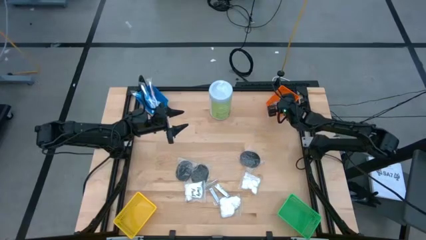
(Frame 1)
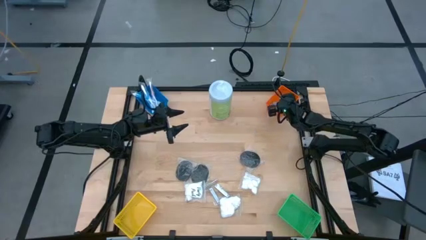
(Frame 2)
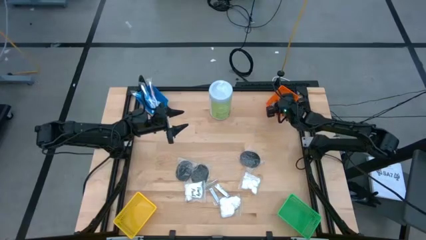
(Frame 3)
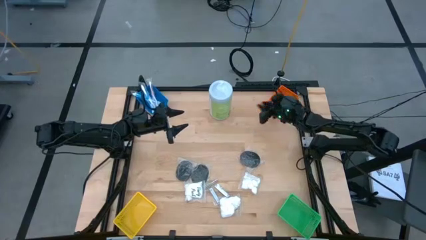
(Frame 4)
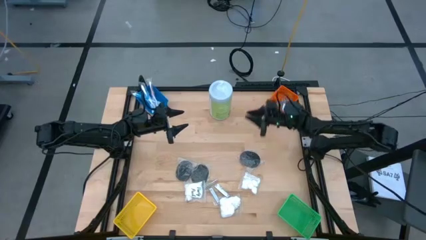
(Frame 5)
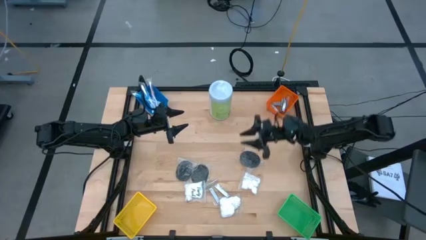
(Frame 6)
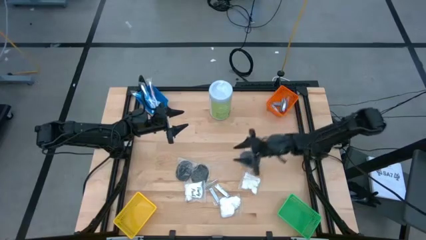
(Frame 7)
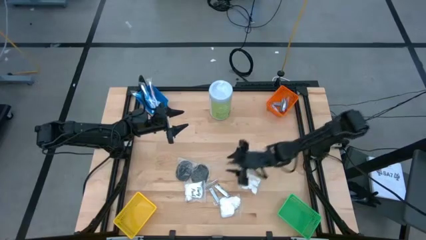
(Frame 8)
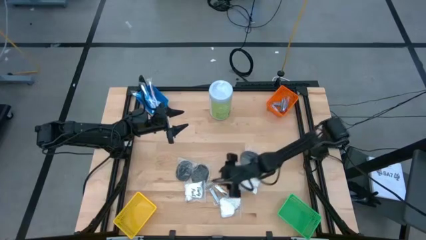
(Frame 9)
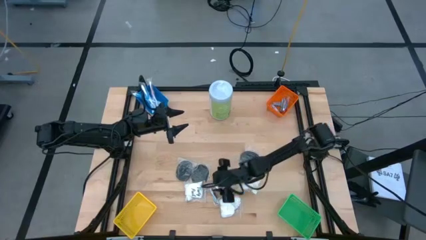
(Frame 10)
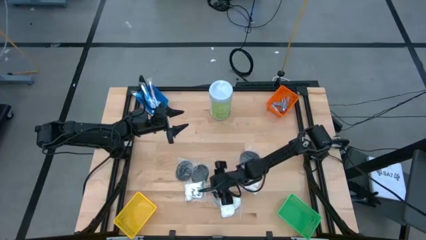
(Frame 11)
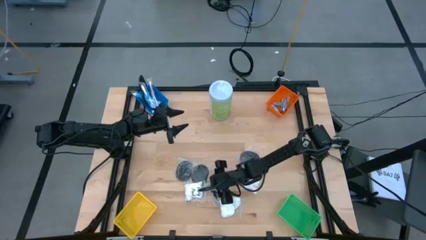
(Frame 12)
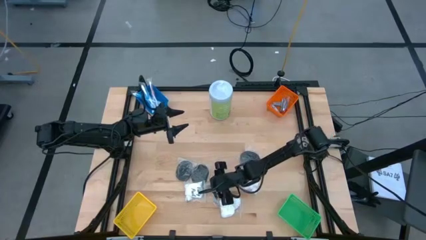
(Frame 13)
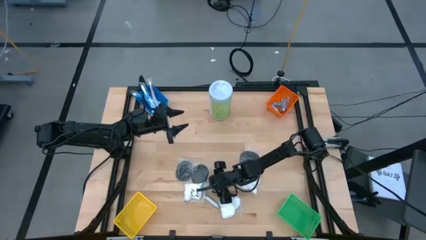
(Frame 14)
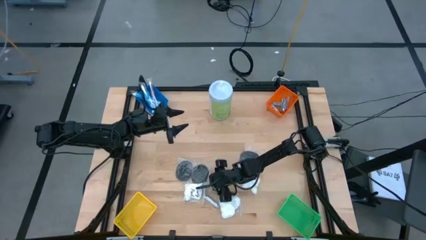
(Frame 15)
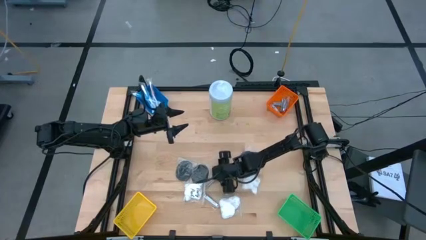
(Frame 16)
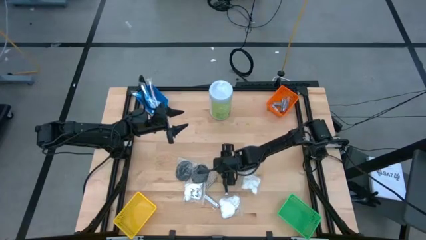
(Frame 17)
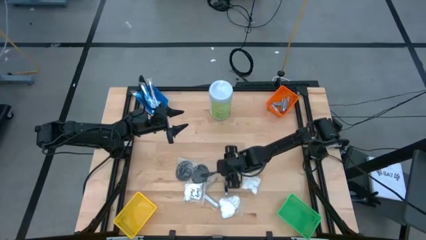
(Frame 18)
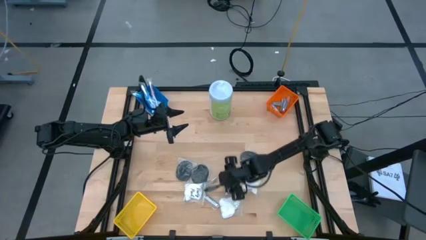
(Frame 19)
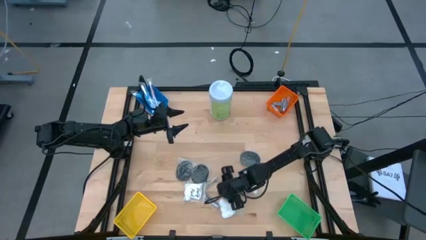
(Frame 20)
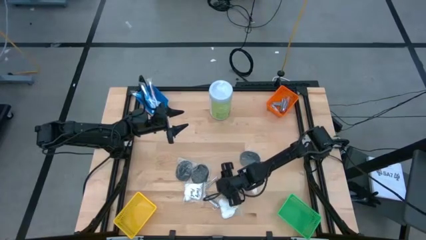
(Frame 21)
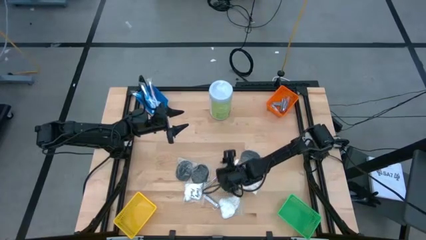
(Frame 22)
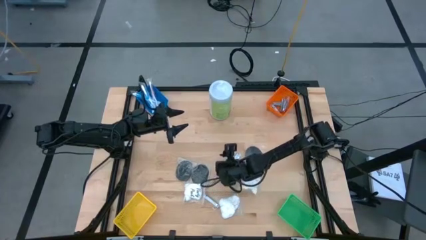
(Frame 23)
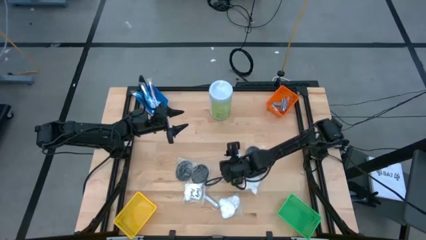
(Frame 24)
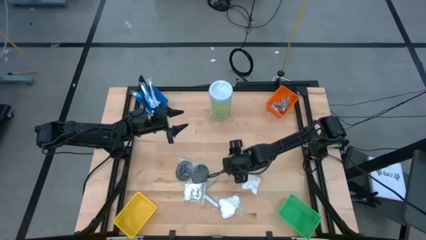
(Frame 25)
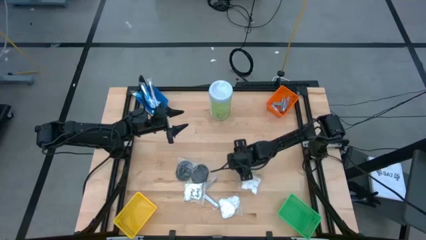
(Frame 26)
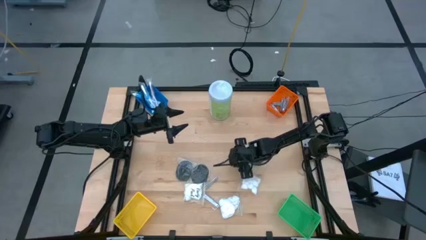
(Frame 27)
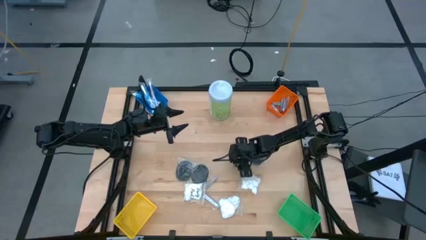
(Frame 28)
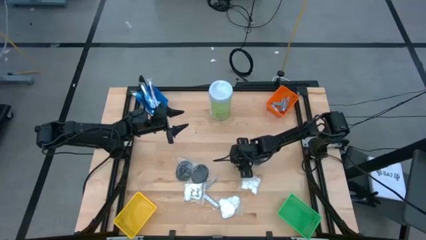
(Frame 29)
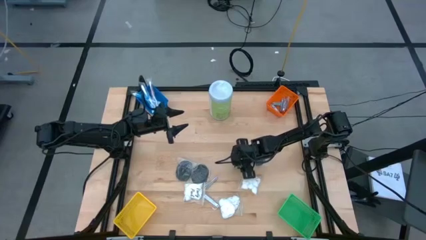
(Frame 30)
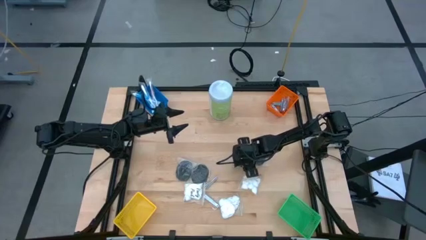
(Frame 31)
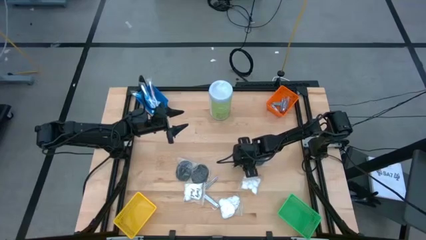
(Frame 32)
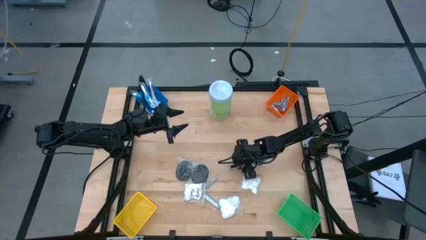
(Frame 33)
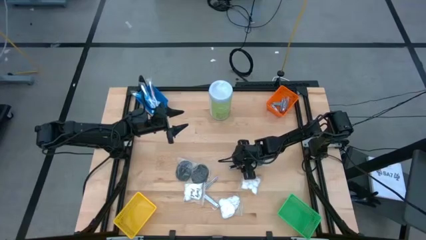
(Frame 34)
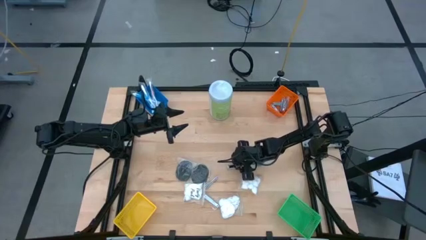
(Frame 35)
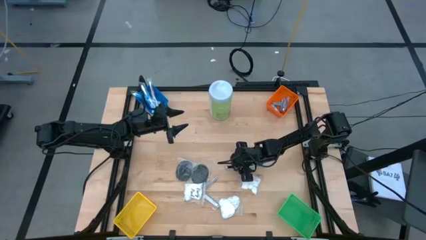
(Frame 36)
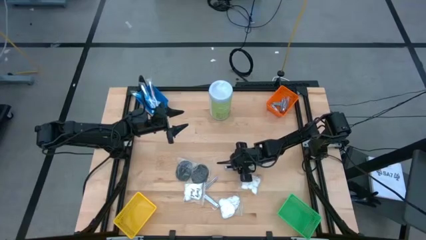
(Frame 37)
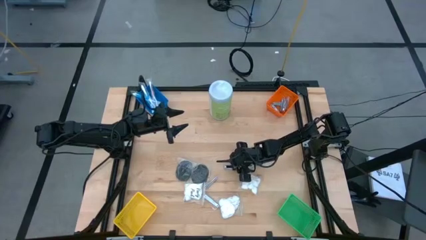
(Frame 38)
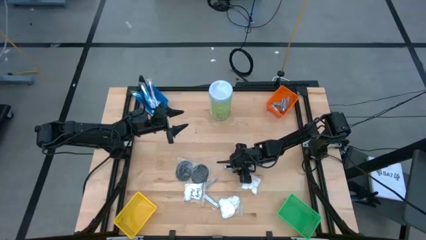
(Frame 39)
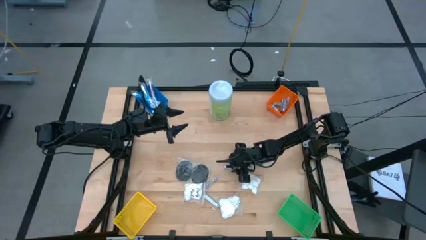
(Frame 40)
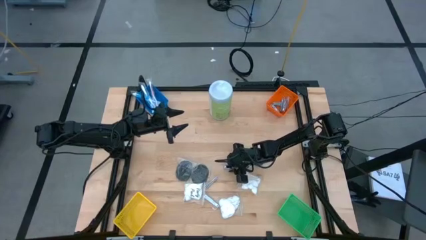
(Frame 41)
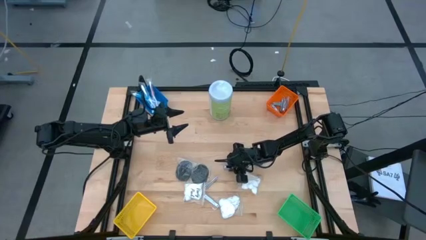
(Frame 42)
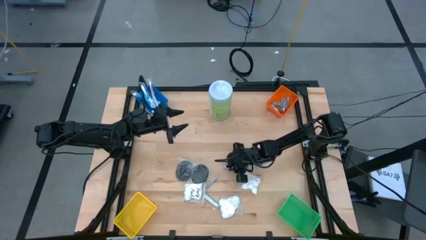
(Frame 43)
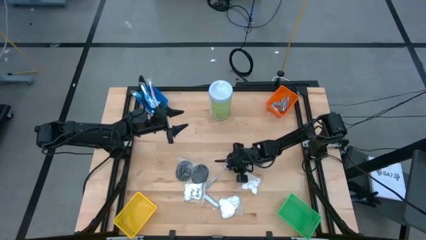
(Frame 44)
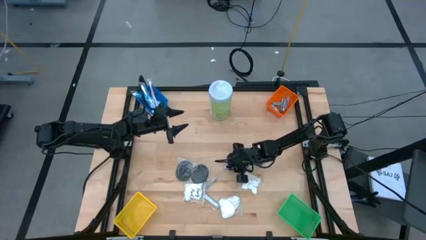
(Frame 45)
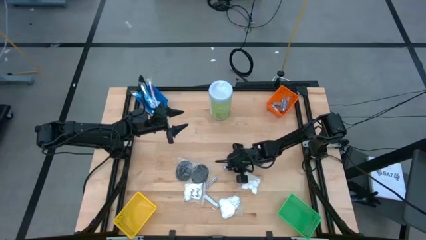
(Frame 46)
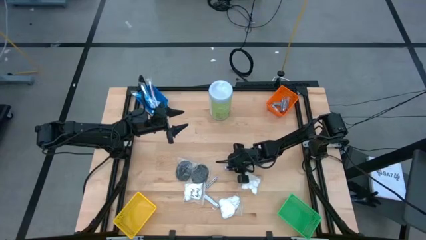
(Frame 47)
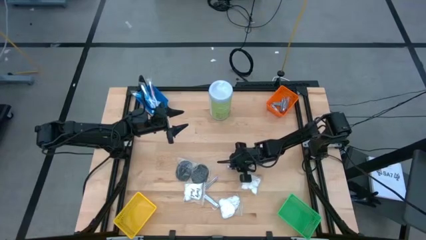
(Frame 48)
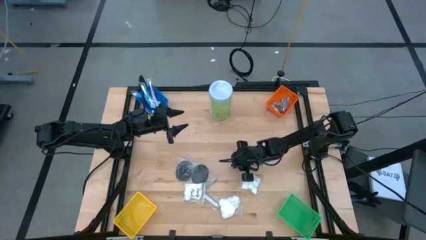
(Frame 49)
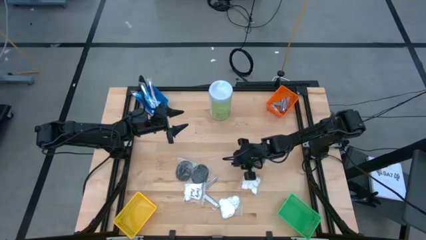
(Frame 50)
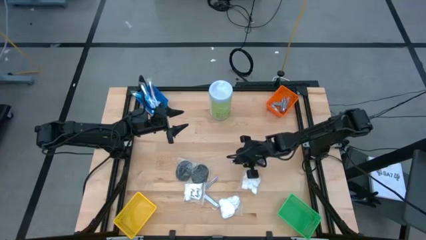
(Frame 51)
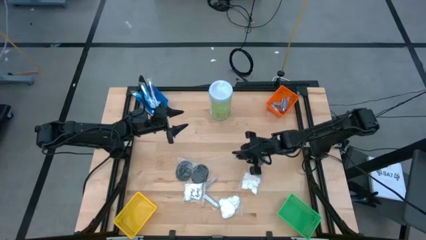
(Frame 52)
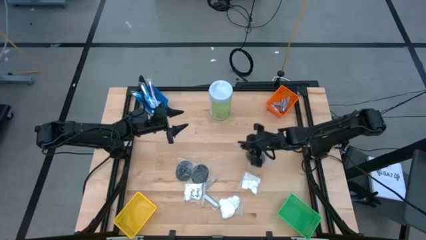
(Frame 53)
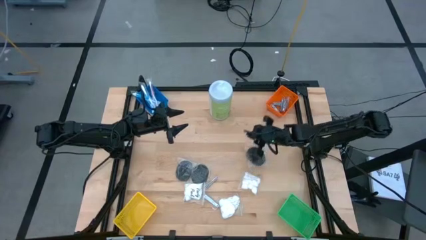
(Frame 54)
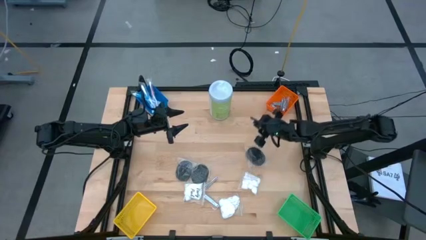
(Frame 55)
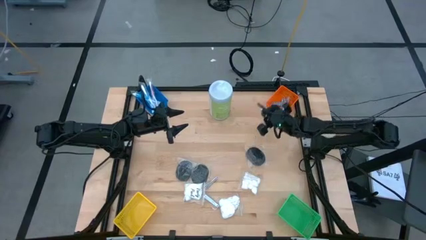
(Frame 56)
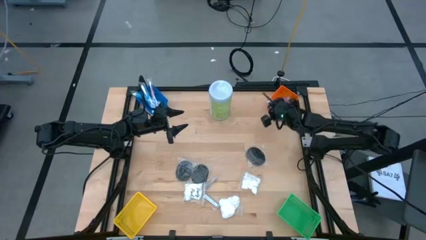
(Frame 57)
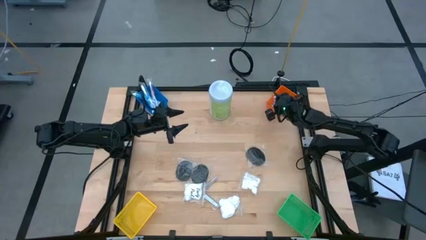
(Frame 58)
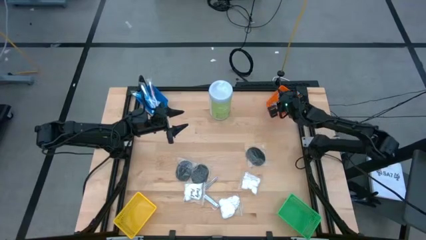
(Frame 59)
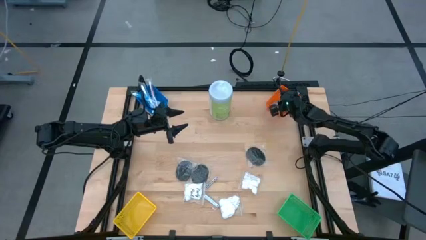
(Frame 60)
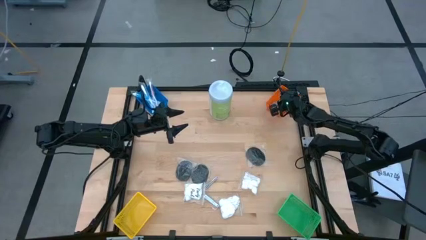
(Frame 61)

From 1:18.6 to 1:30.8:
Task: Pick & Place Travel size toiletries
Put the nail cutter into the orange bin

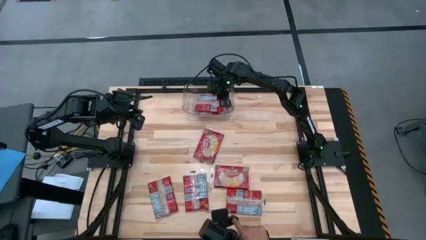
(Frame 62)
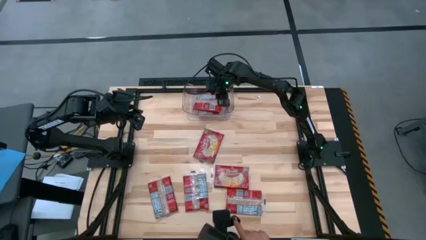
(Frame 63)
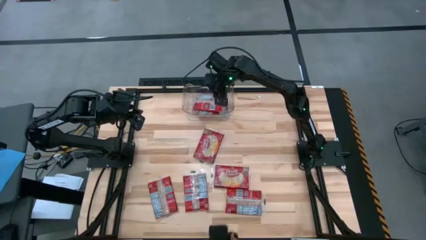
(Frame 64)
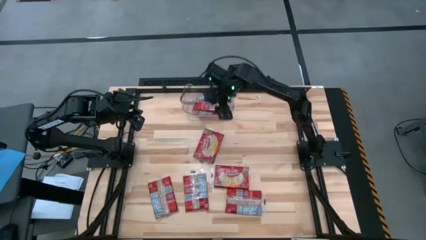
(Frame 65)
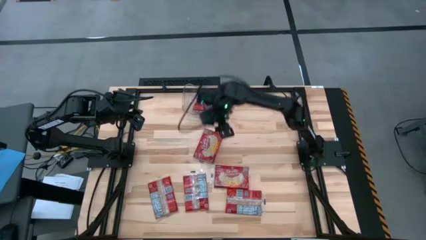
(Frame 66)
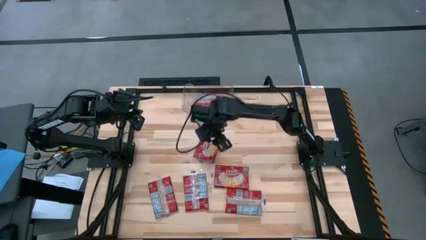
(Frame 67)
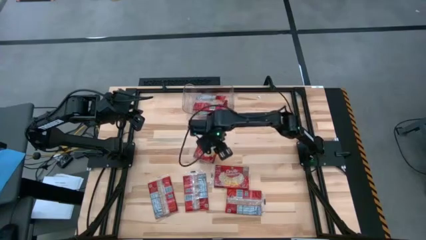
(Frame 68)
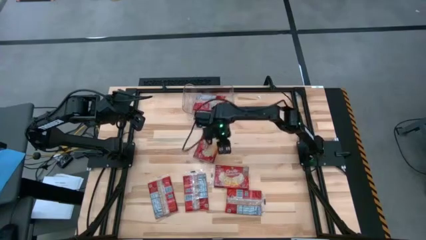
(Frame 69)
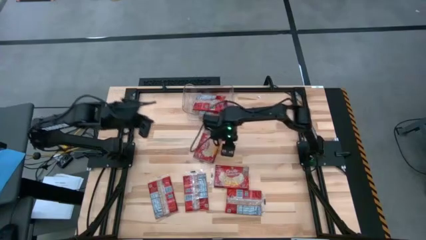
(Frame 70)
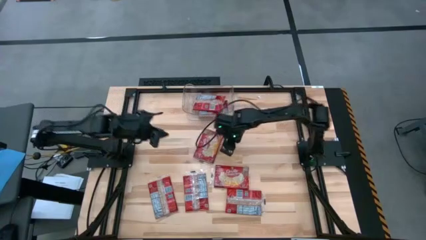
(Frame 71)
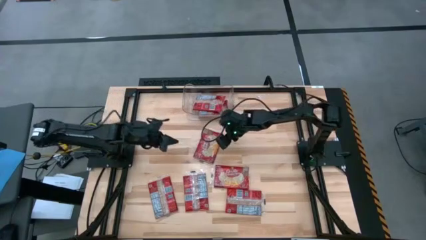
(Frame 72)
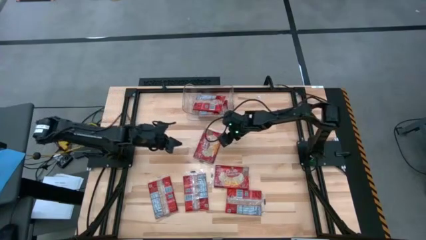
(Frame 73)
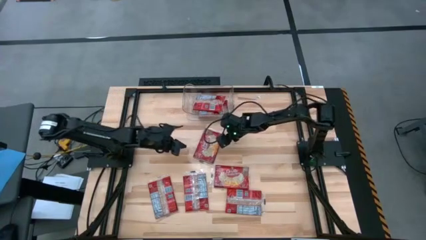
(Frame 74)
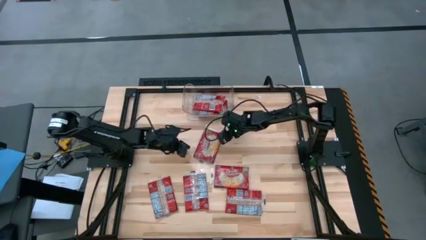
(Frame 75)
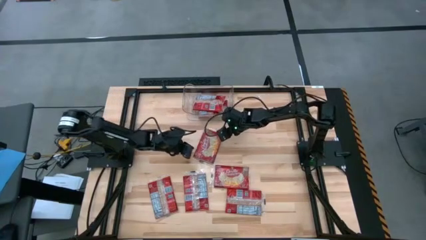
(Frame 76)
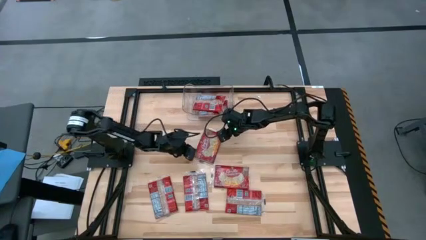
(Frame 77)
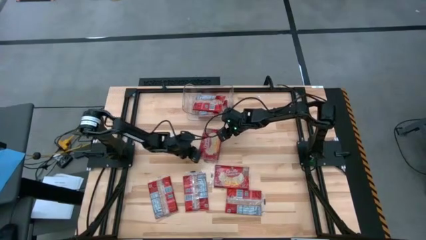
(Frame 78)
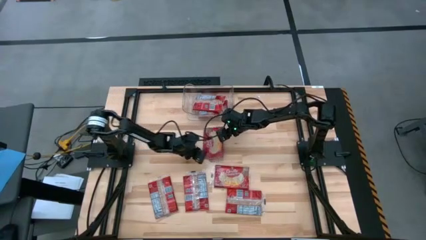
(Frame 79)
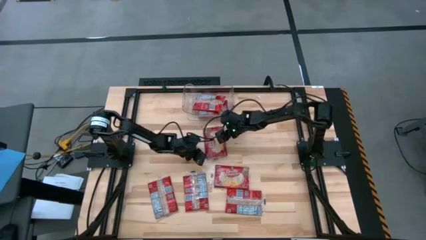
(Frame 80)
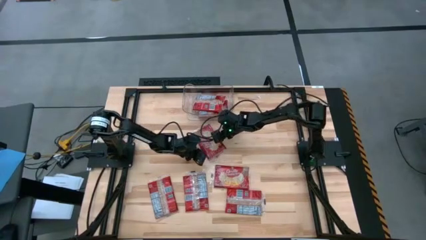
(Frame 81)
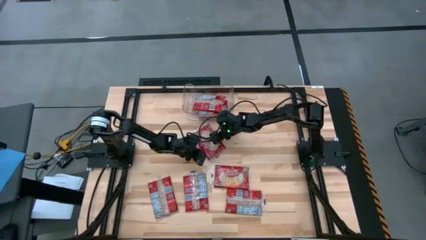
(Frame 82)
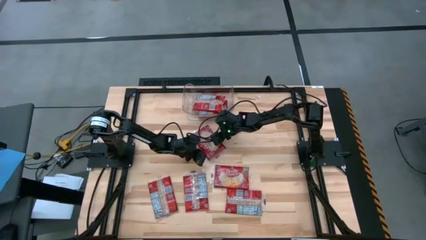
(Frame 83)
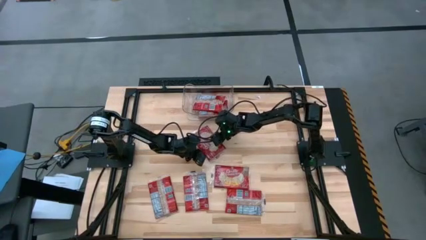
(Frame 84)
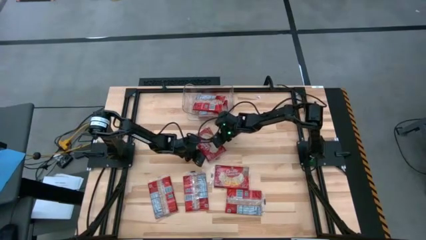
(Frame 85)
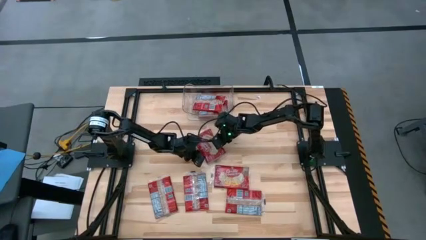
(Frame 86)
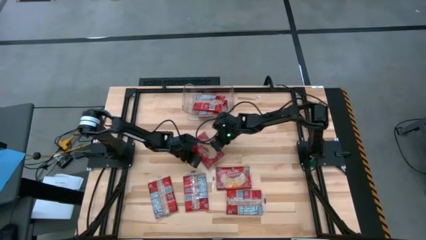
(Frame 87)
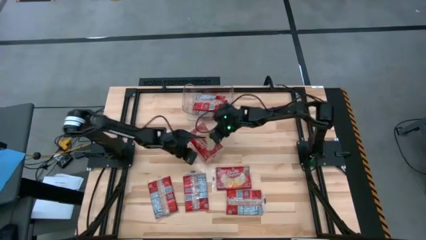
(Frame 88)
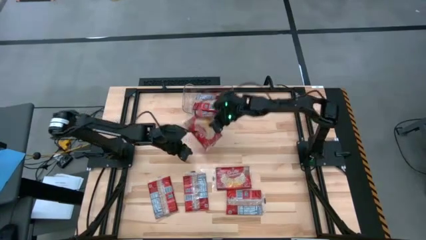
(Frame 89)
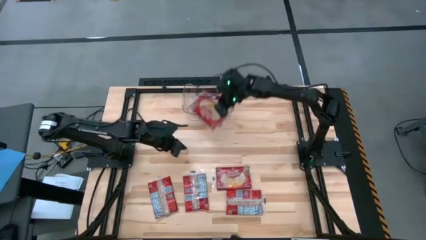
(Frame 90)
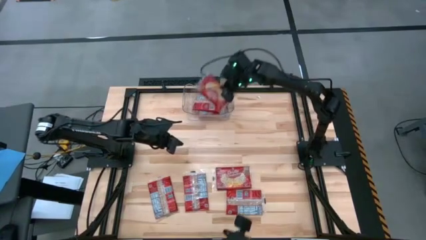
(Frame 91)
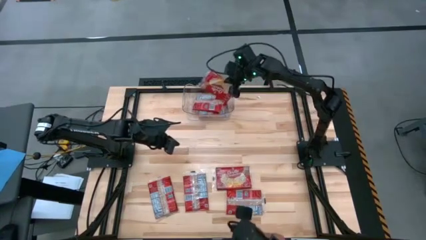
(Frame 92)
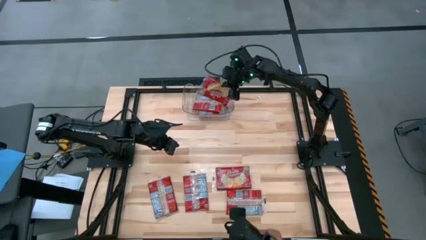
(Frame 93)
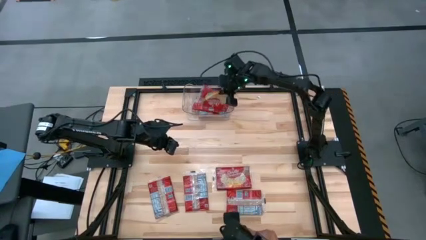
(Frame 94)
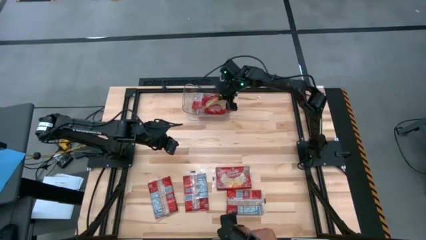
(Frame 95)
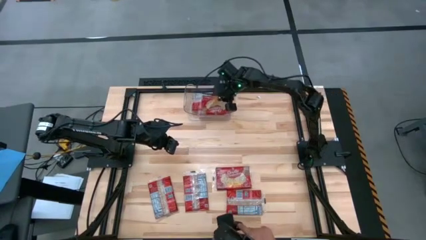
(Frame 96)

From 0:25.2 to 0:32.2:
Task: Sort popcorn bags into baskets
Put the red popcorn pack into the transparent bin
